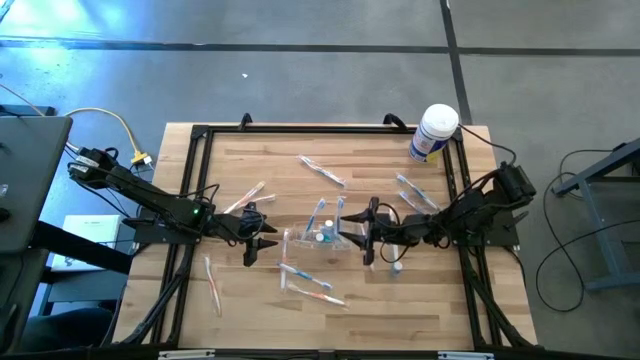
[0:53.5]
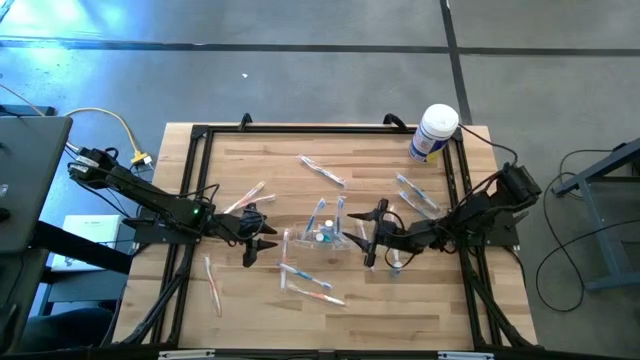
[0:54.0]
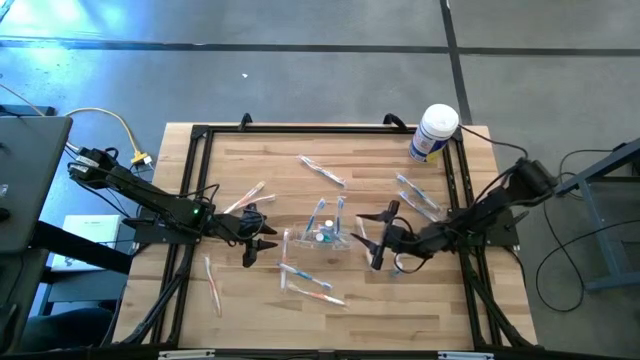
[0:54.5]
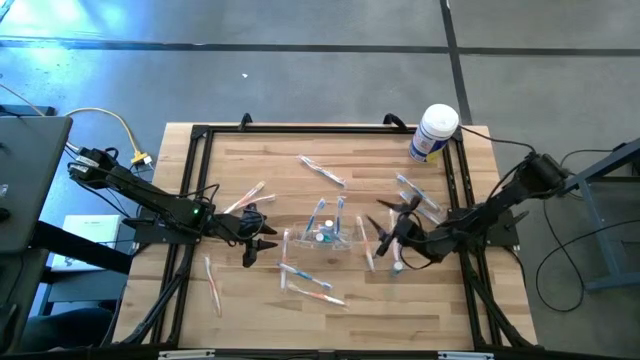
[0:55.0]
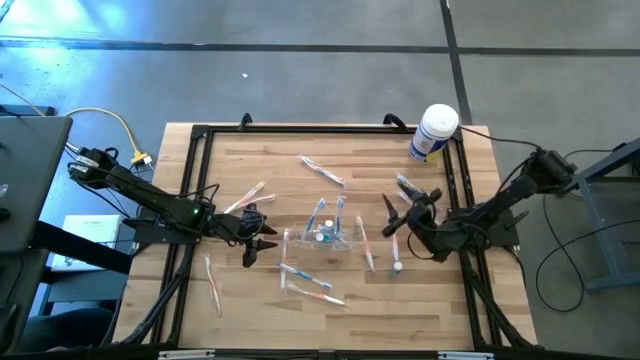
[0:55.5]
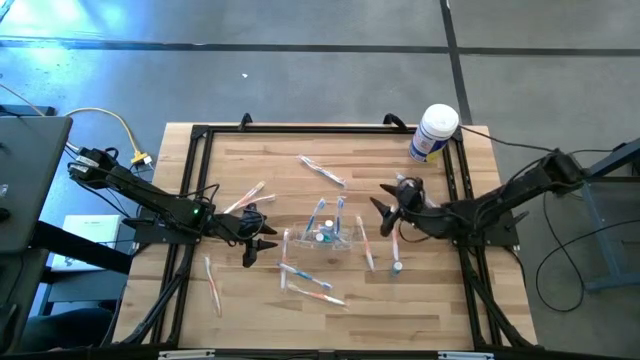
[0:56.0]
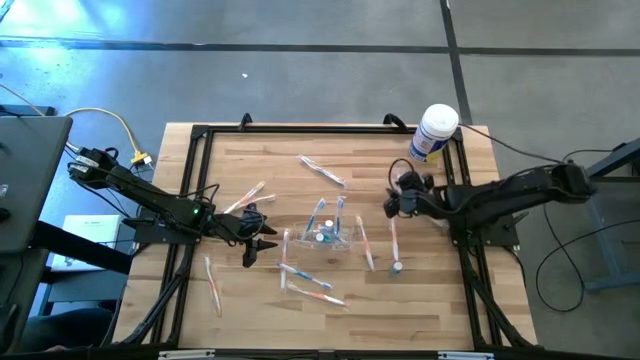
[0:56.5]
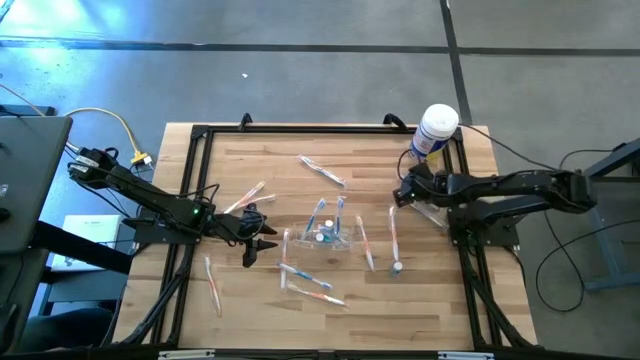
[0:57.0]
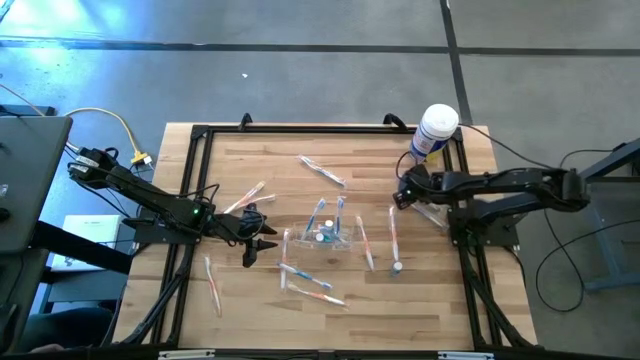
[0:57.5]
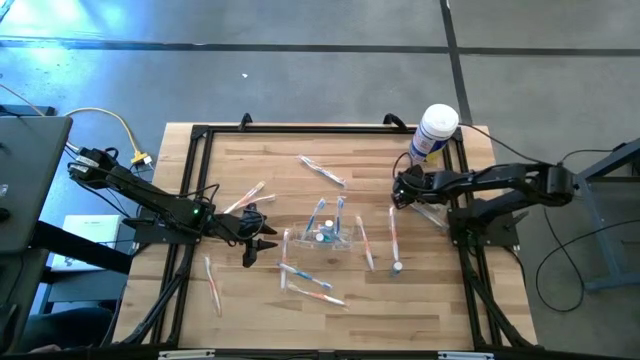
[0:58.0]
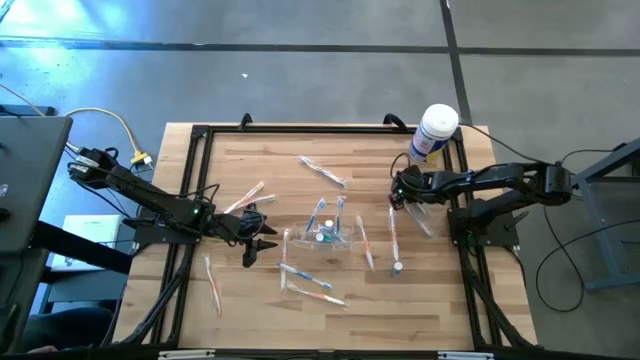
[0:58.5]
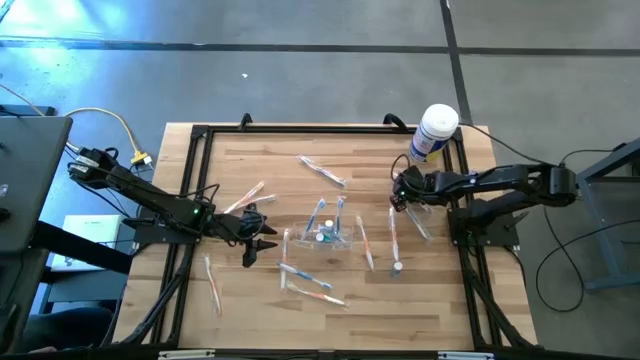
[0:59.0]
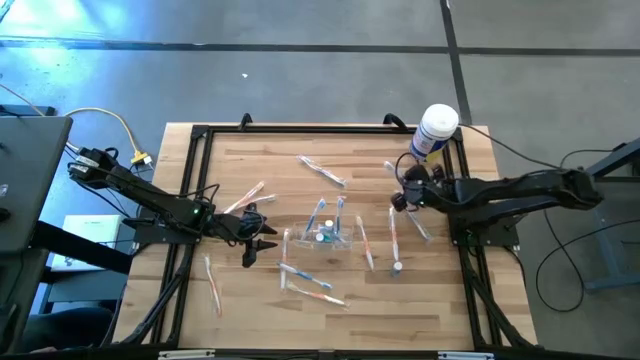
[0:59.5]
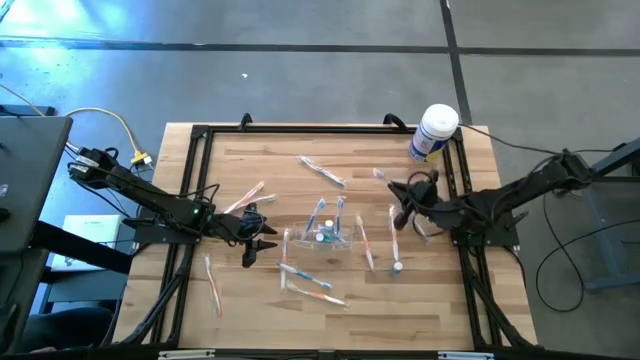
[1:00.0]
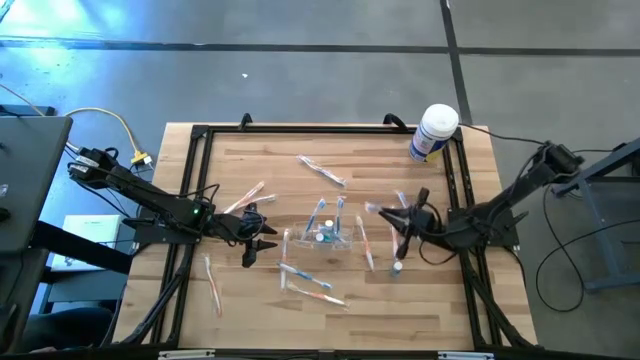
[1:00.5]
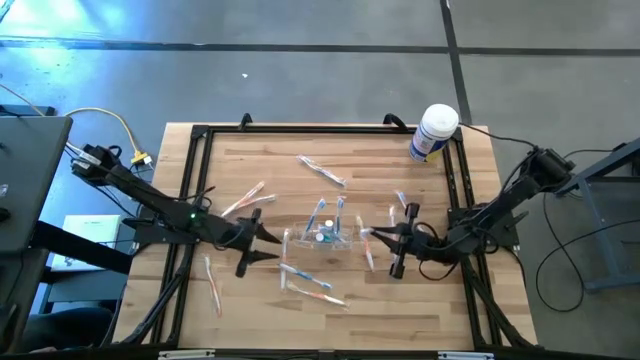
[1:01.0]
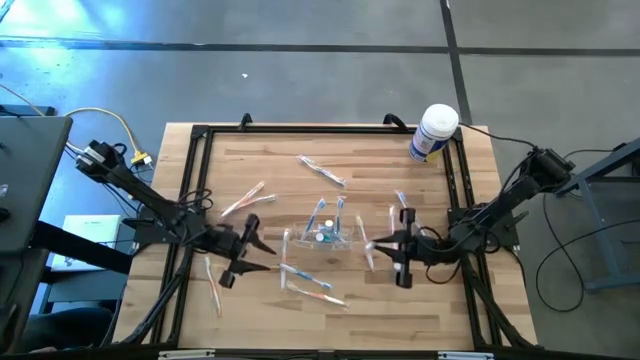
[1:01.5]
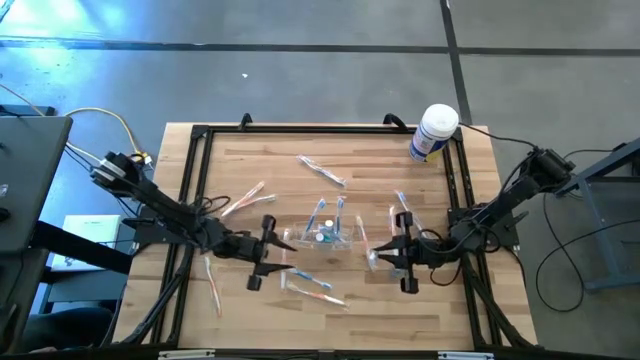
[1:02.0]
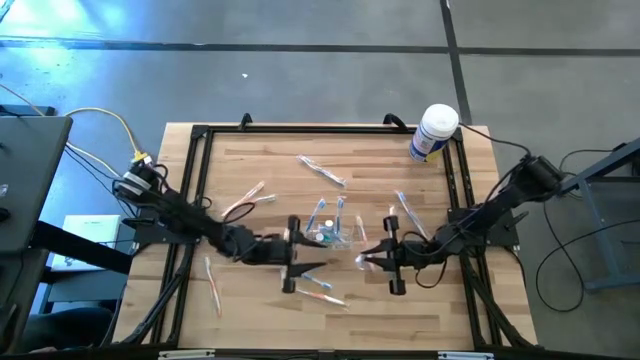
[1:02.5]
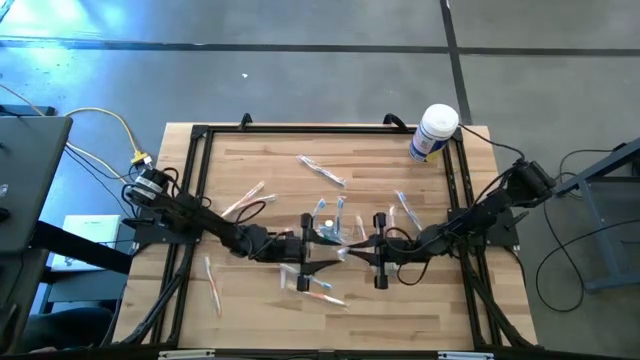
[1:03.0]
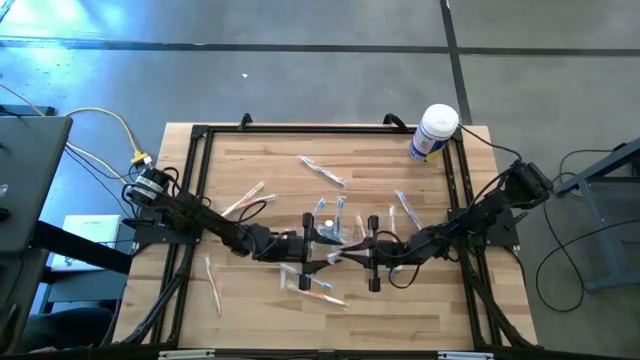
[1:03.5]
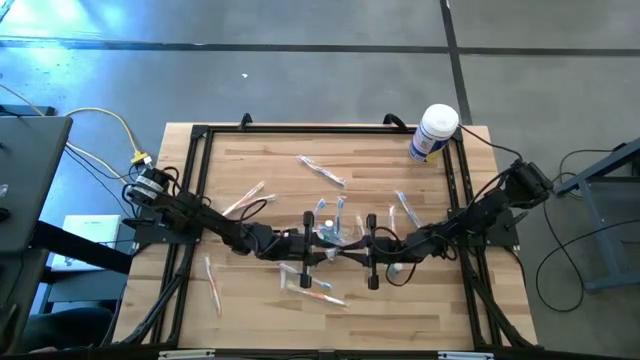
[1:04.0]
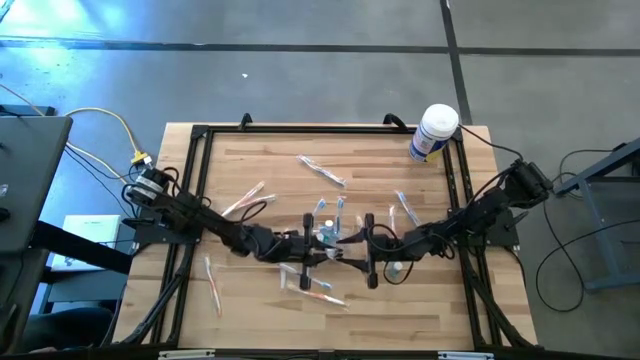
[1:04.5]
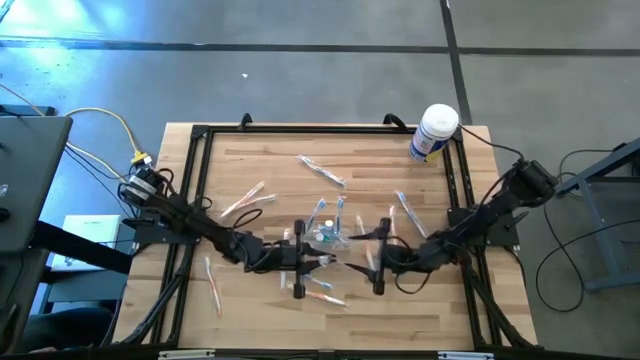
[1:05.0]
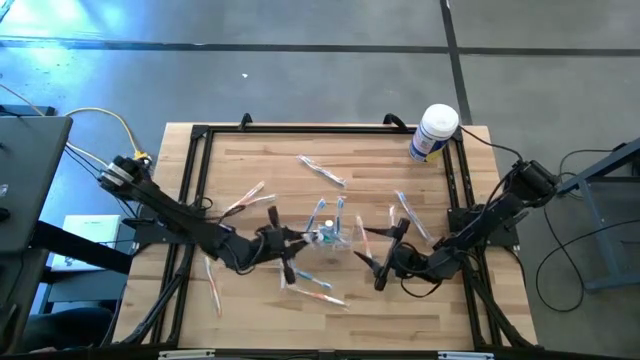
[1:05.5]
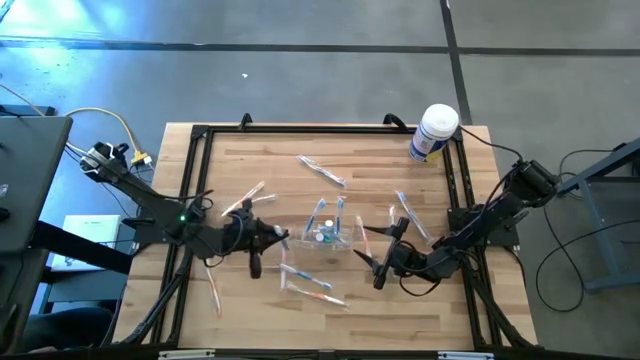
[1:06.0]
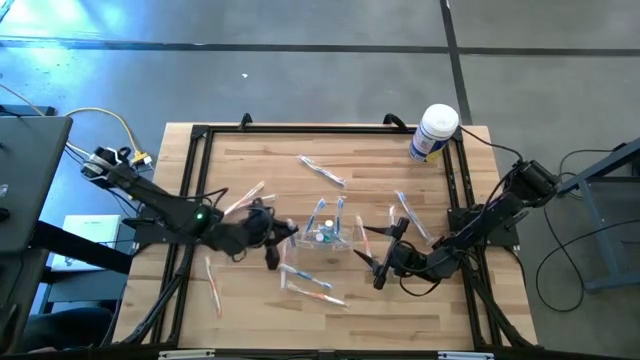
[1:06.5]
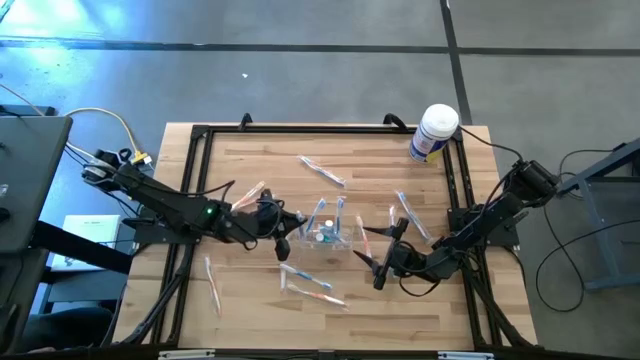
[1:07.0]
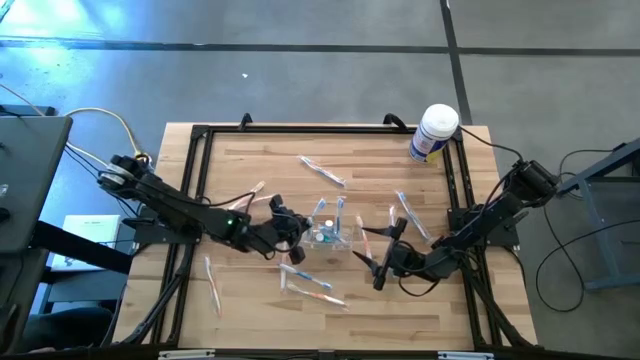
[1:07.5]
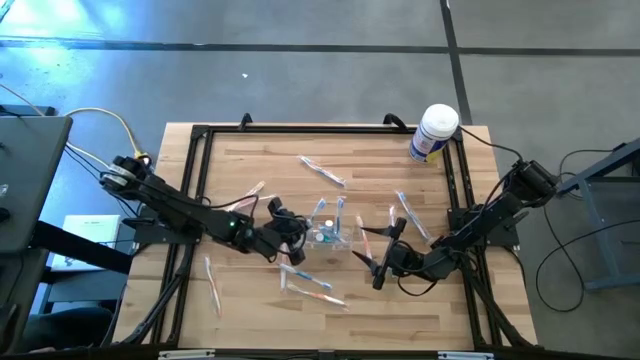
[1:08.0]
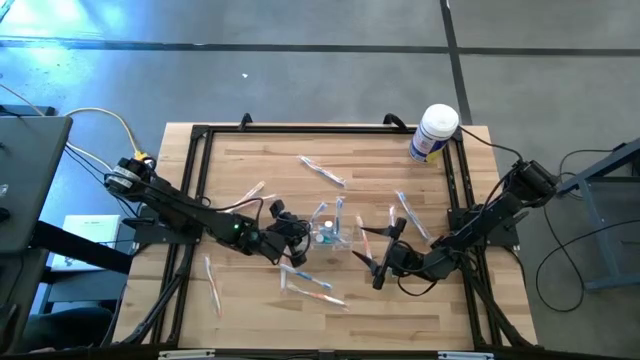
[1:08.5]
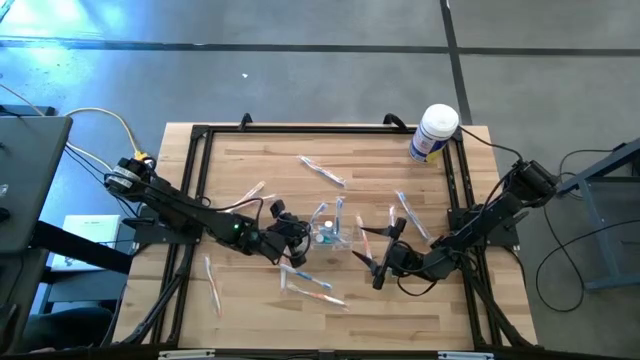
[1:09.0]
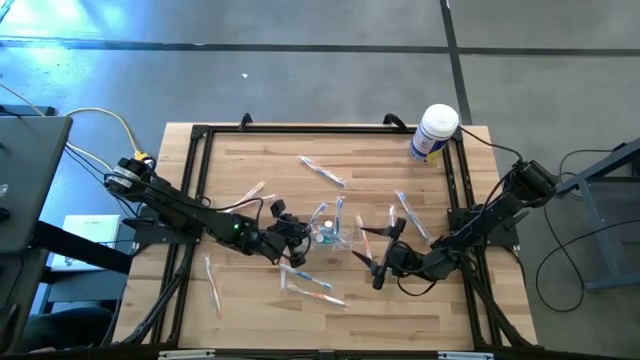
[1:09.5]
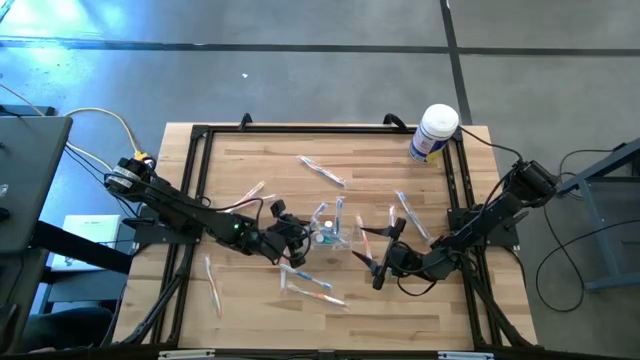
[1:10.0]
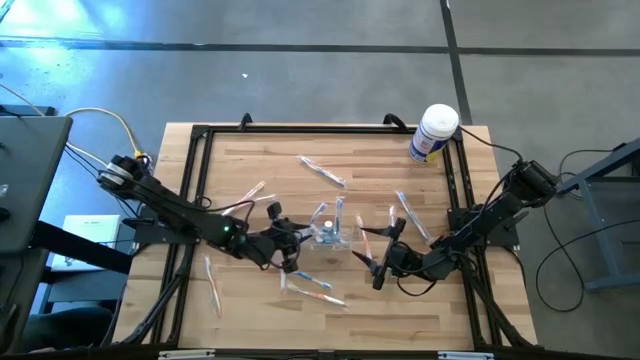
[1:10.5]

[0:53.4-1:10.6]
Task: Pick & Place toothbrushing station
Put the blue toothbrush into the transparent organizer

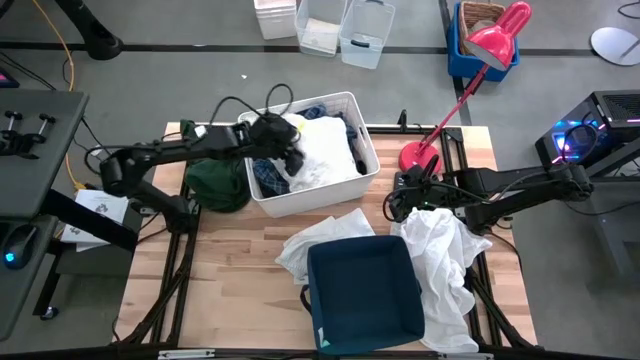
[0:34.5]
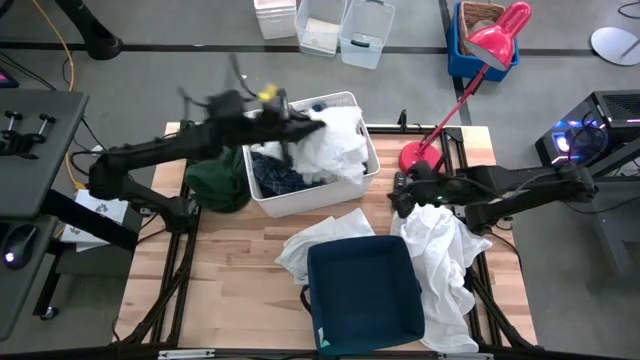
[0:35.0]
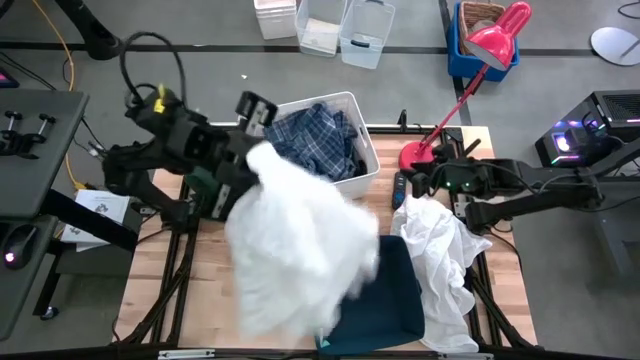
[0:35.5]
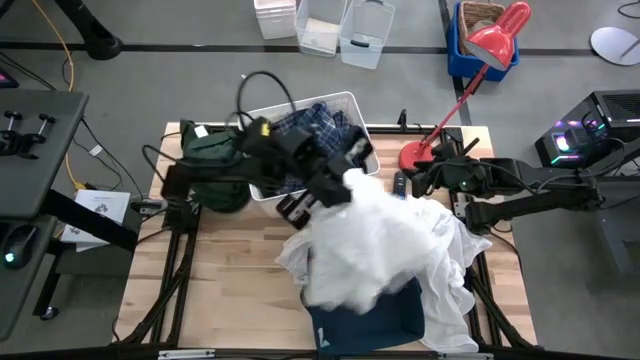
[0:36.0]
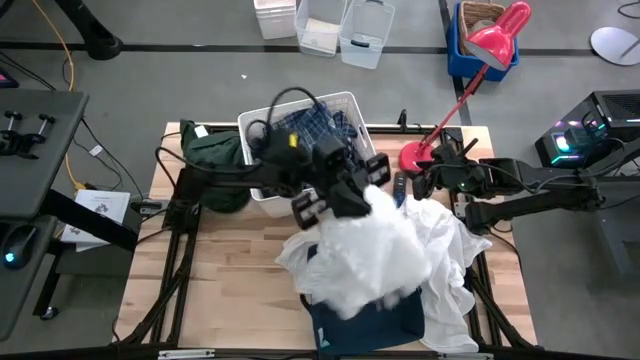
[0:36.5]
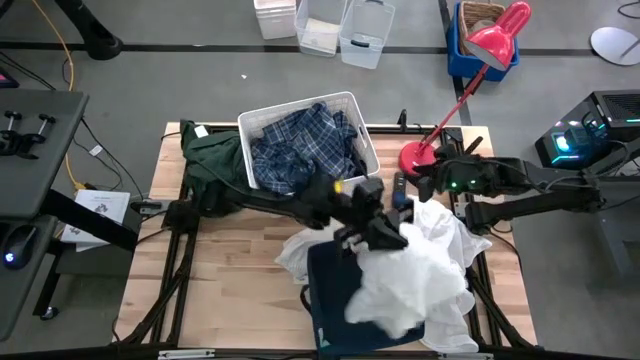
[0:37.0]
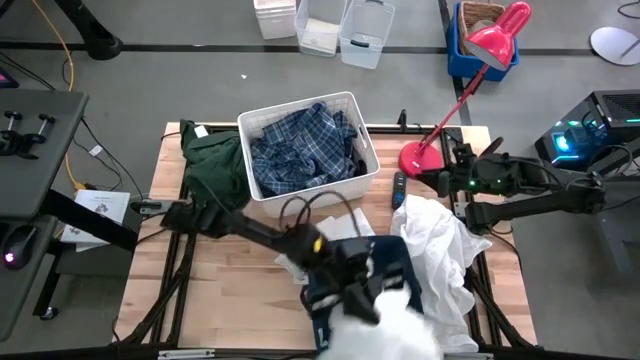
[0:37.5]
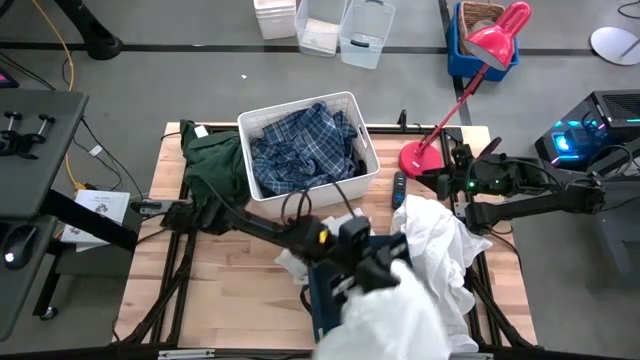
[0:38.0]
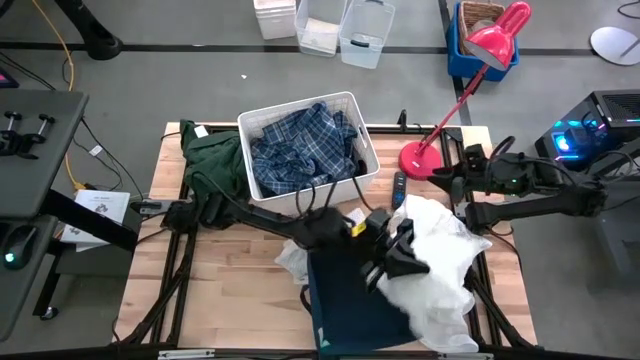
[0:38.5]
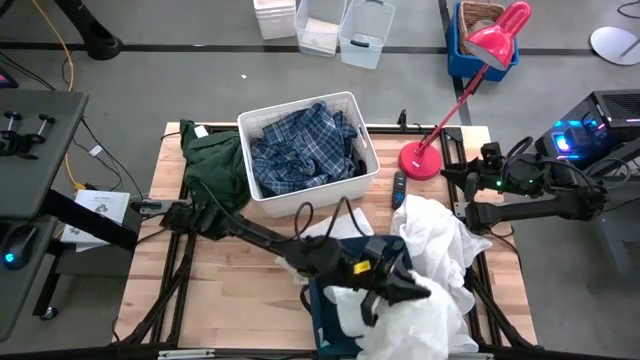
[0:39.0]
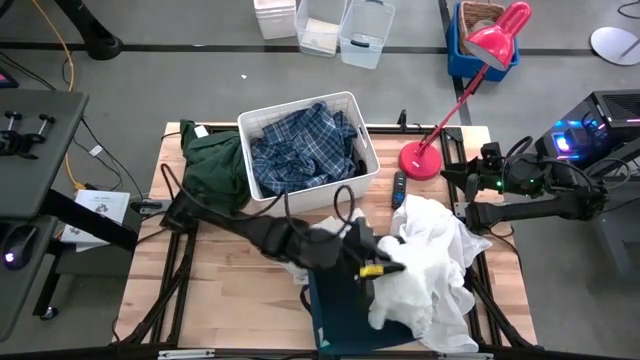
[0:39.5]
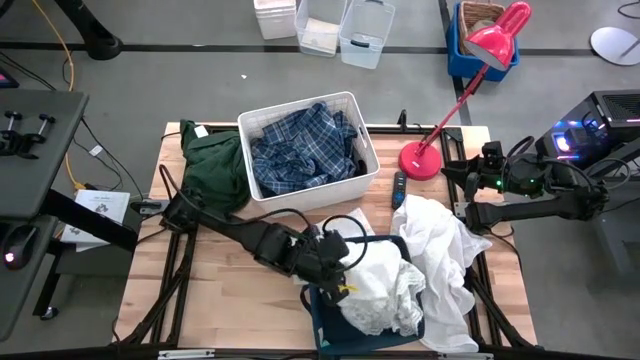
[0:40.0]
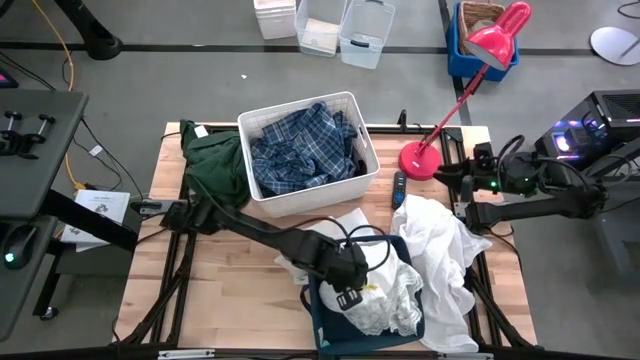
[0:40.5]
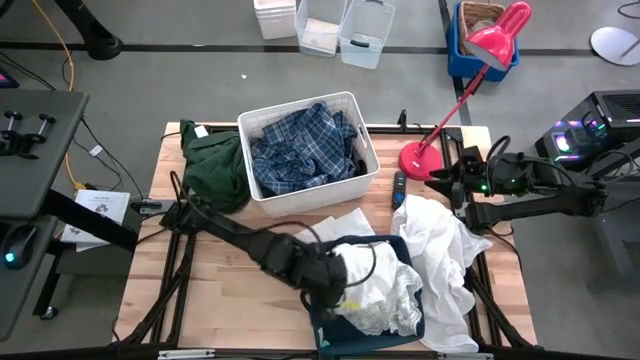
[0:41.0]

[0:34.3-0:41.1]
Task: Sort clothes
Put the white dress into the blue laundry bin
